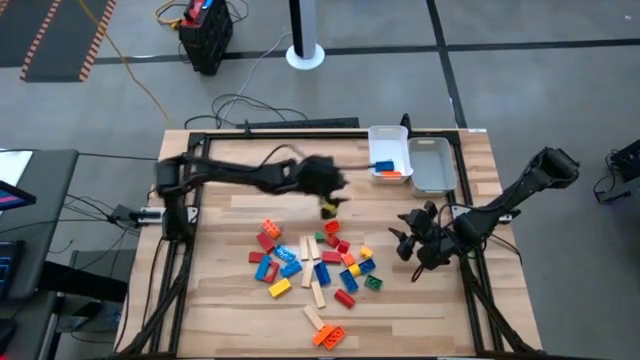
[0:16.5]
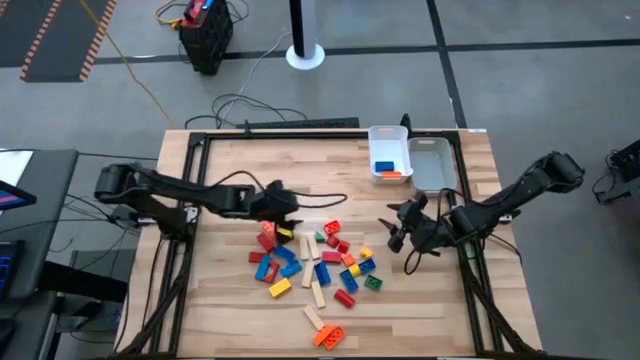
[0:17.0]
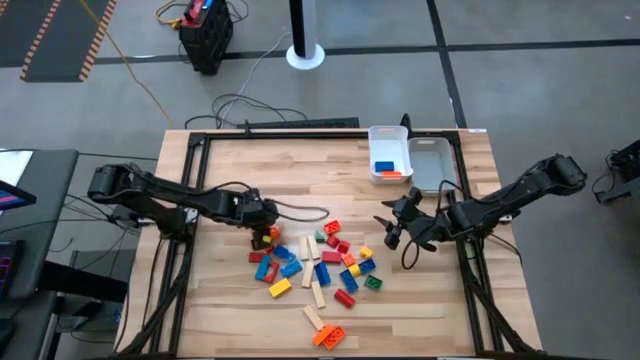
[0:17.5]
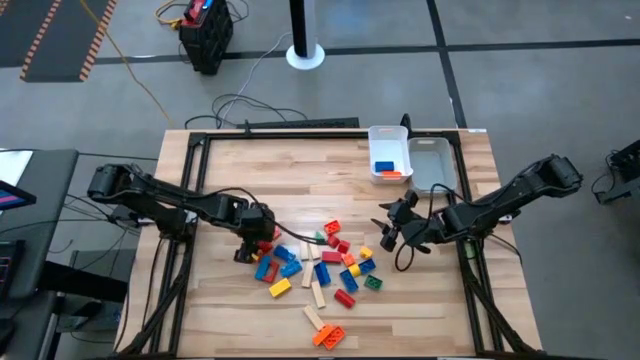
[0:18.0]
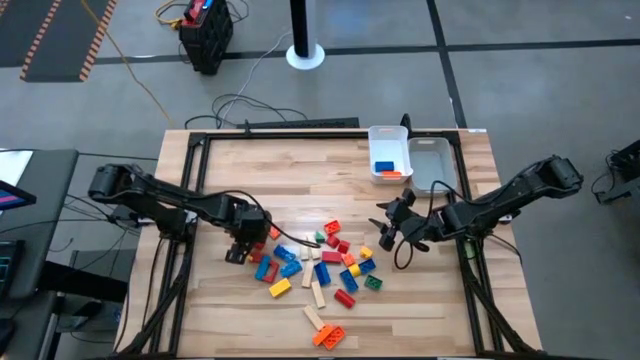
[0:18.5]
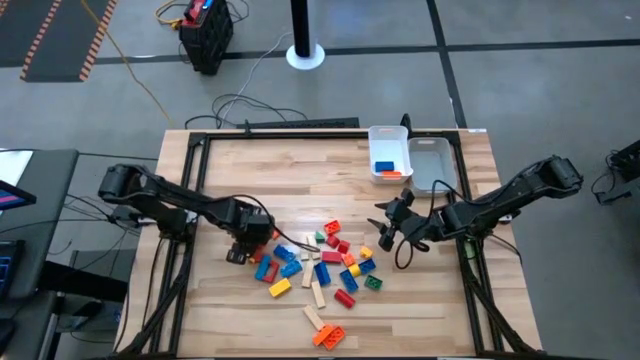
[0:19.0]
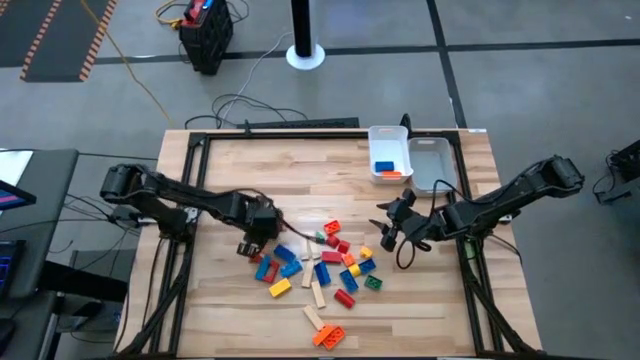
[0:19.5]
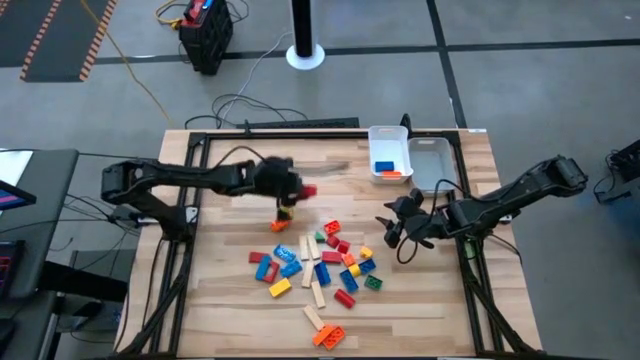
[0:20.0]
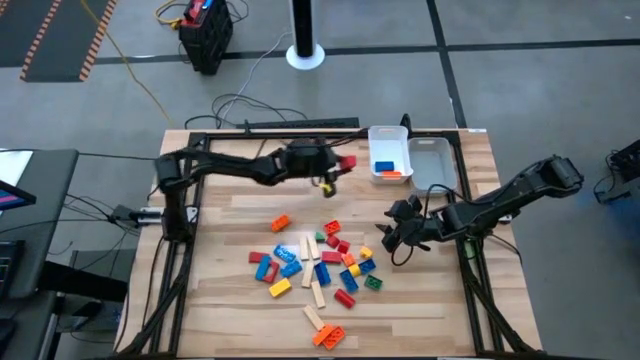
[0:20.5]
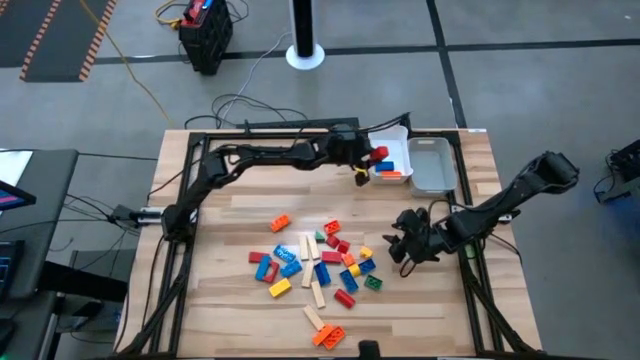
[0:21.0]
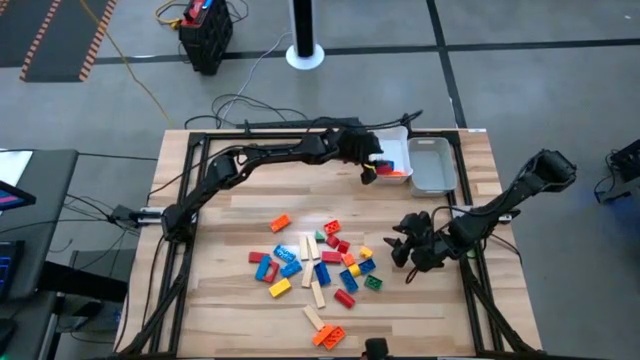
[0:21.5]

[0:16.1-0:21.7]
Task: Sort blocks by size
Put the large red wooden block into the white bin

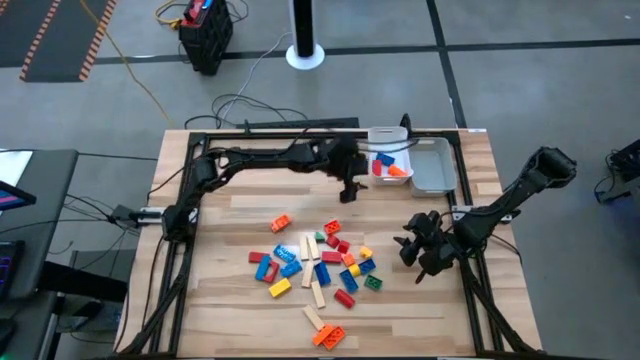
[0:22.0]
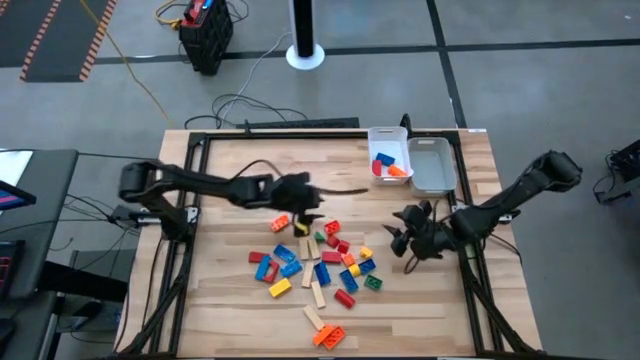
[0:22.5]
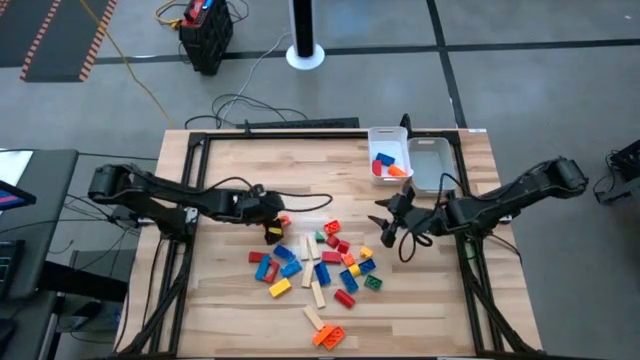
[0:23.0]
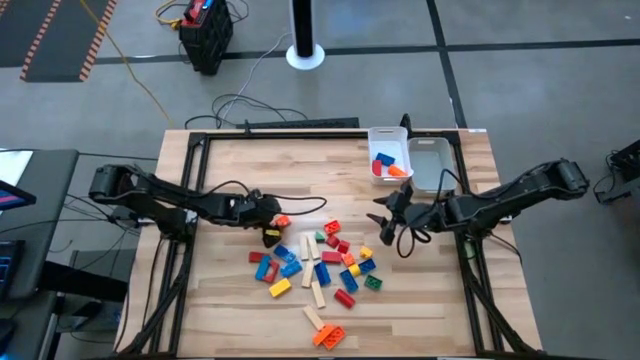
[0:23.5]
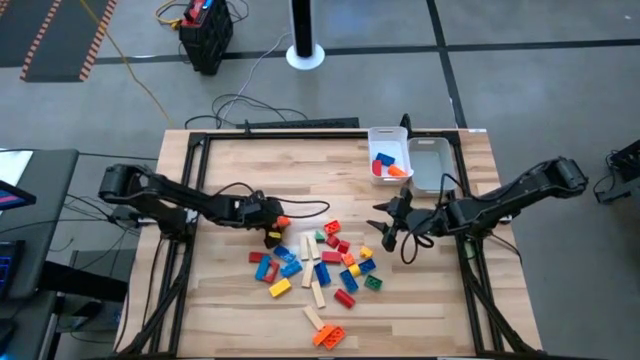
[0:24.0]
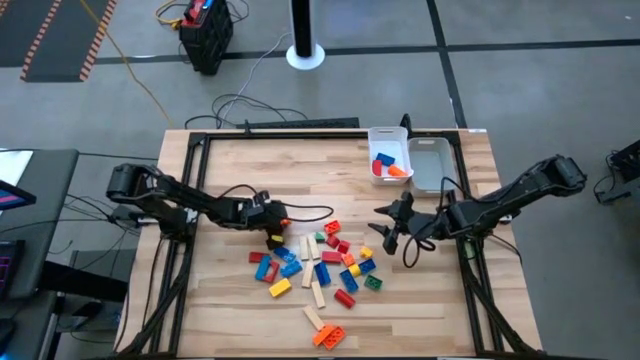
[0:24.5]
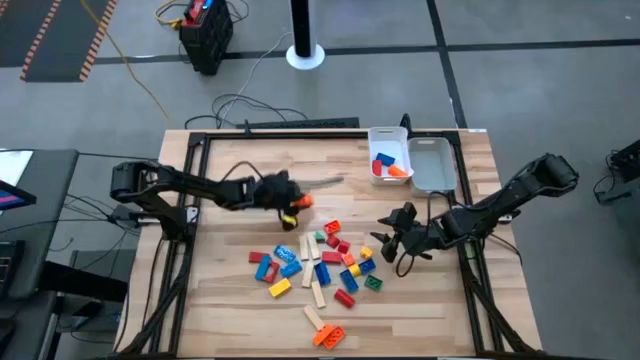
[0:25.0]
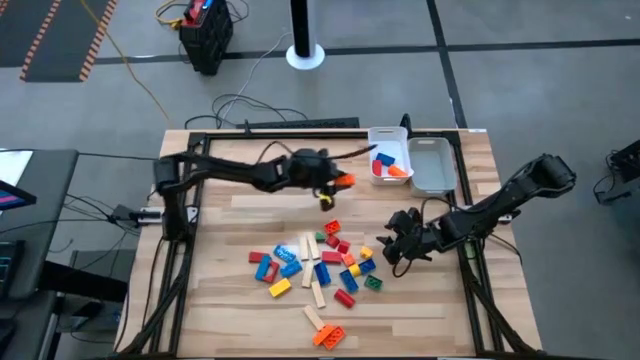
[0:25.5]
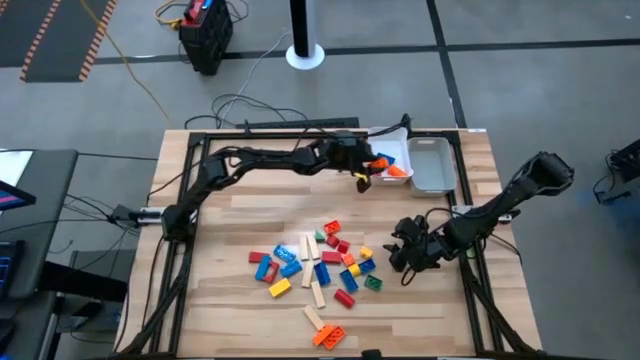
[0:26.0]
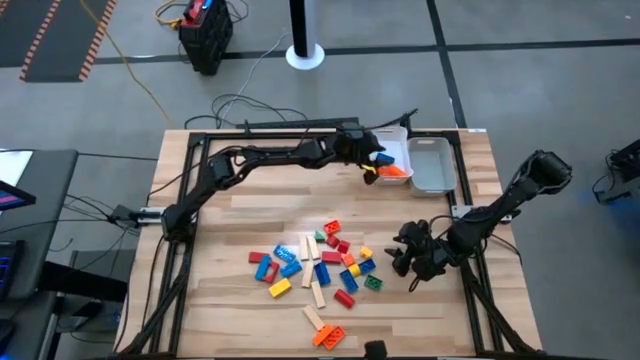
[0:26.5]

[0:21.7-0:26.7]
Put the large orange game piece into the white bin

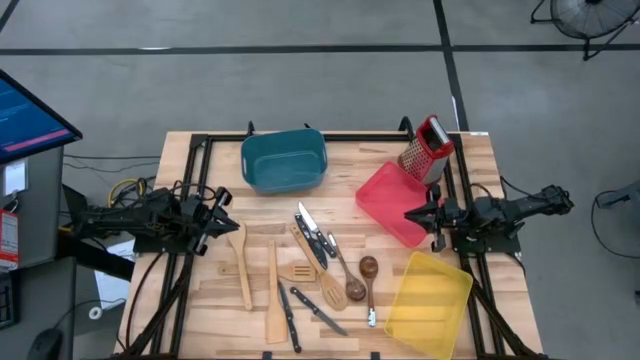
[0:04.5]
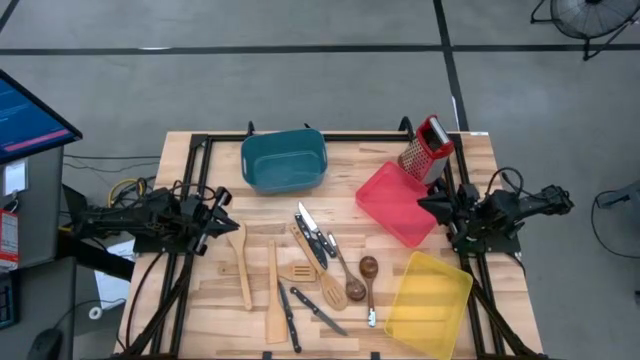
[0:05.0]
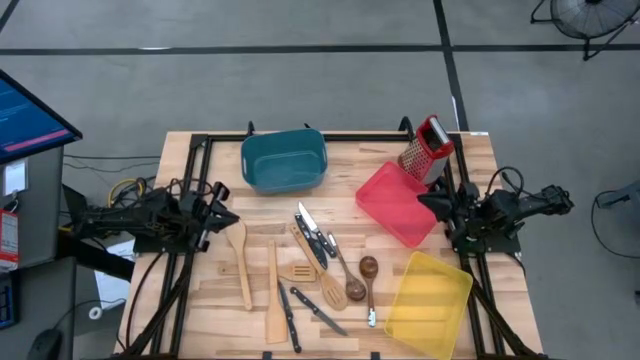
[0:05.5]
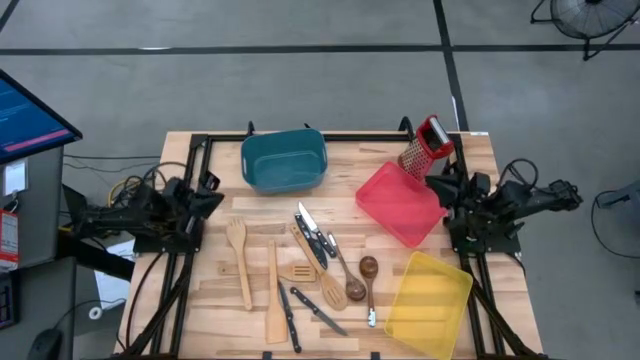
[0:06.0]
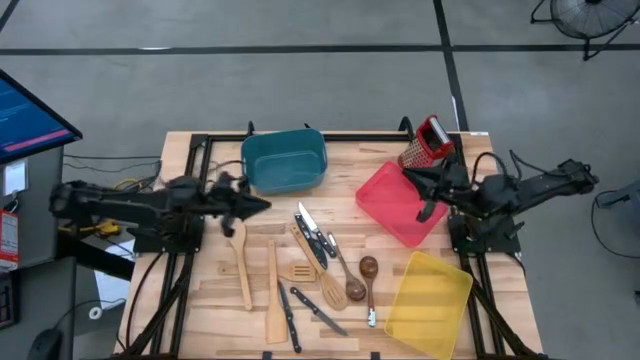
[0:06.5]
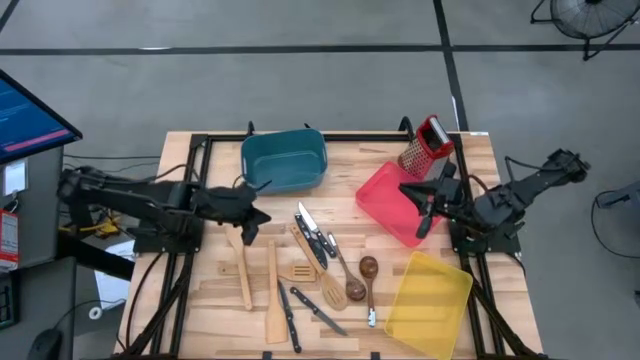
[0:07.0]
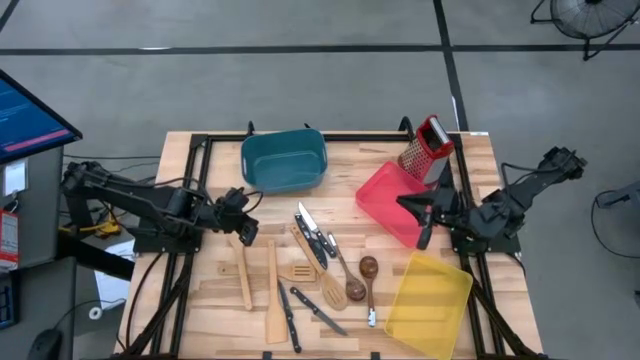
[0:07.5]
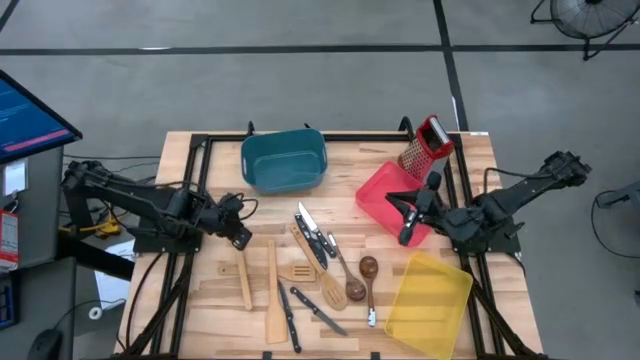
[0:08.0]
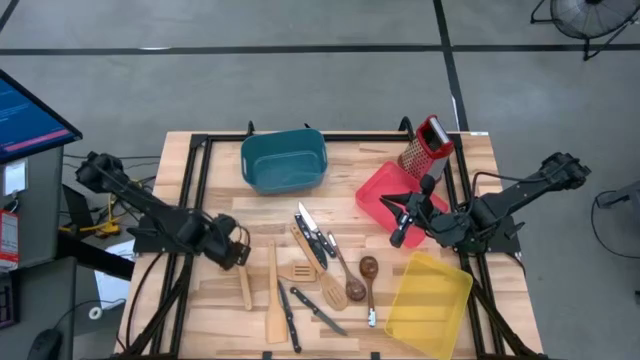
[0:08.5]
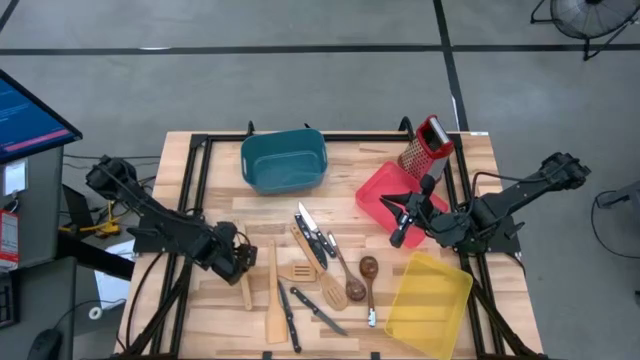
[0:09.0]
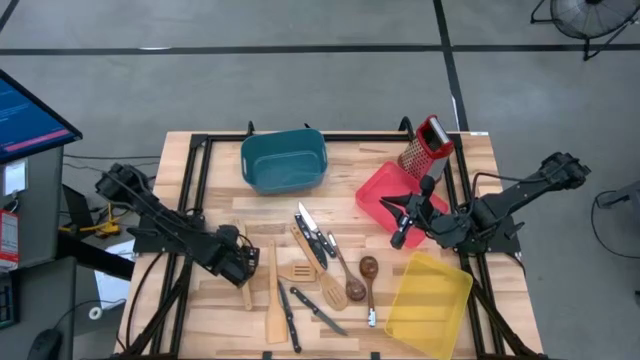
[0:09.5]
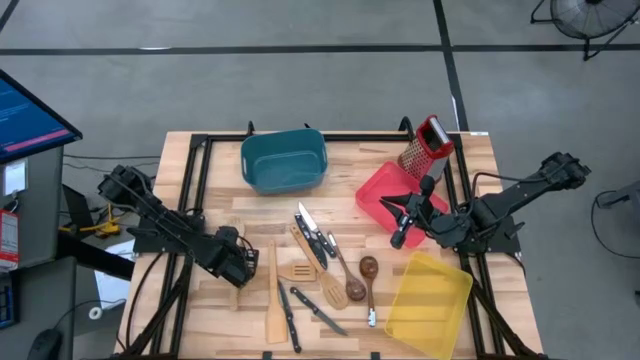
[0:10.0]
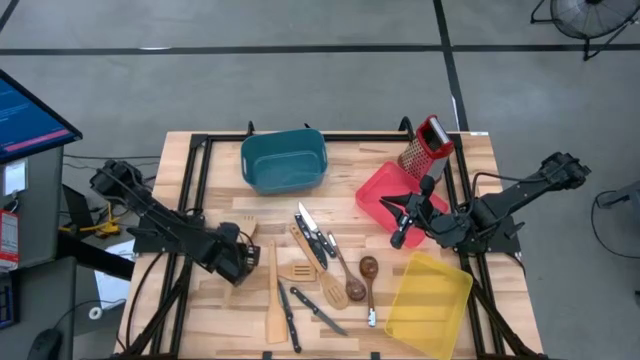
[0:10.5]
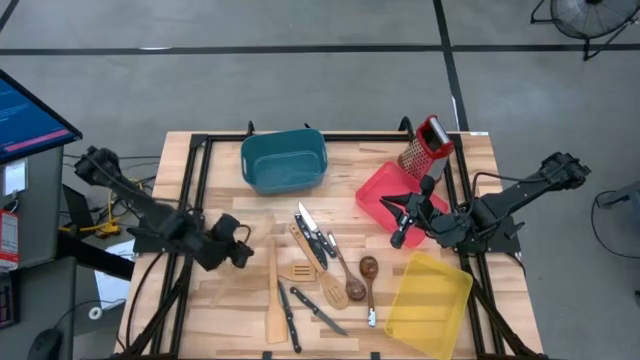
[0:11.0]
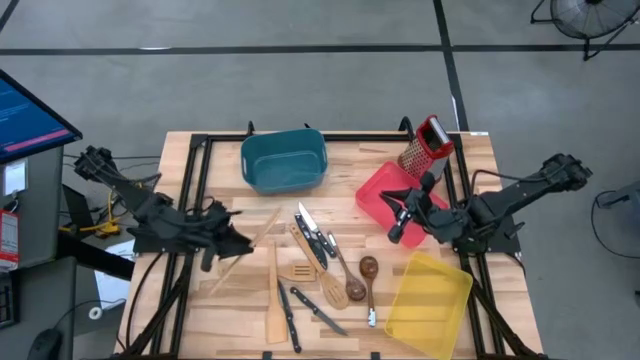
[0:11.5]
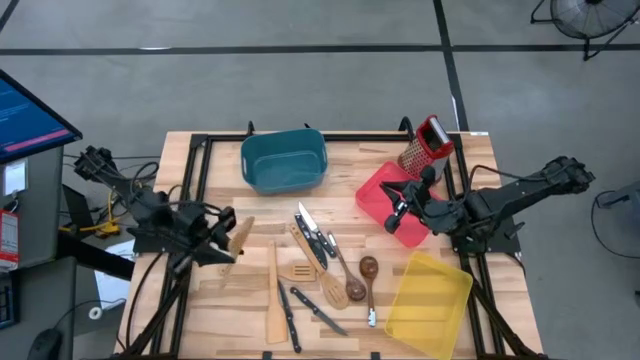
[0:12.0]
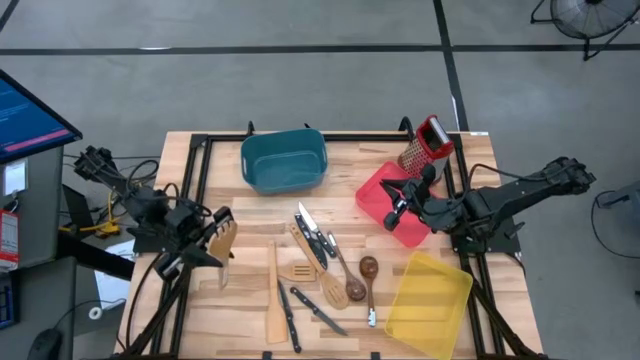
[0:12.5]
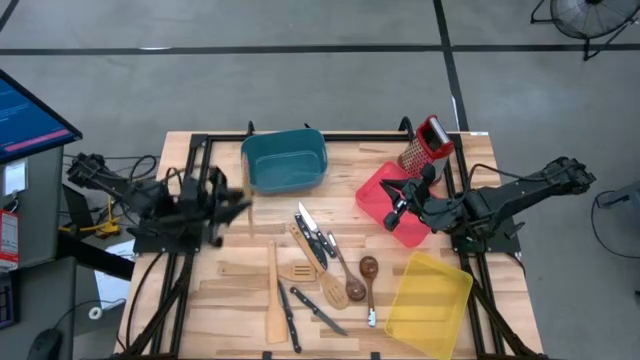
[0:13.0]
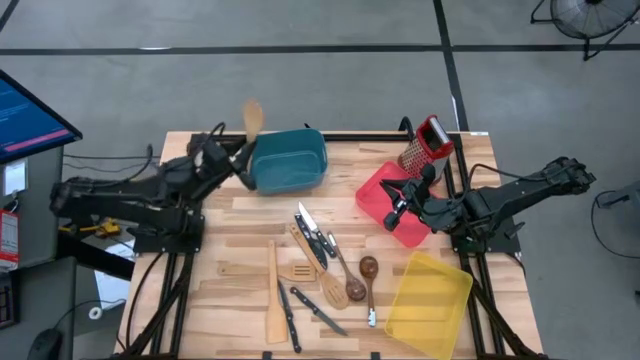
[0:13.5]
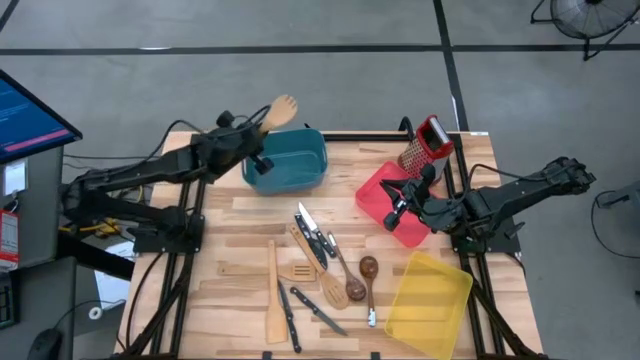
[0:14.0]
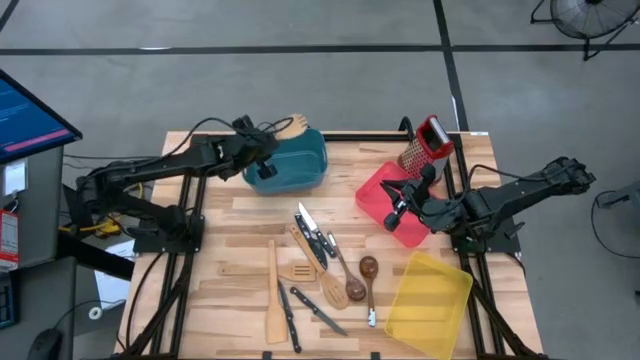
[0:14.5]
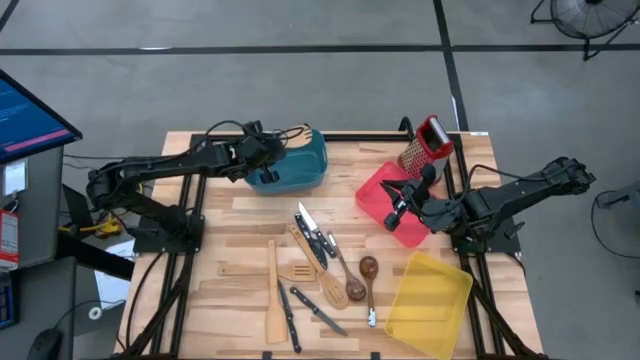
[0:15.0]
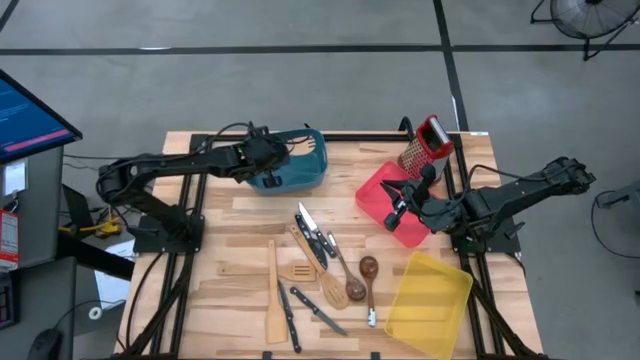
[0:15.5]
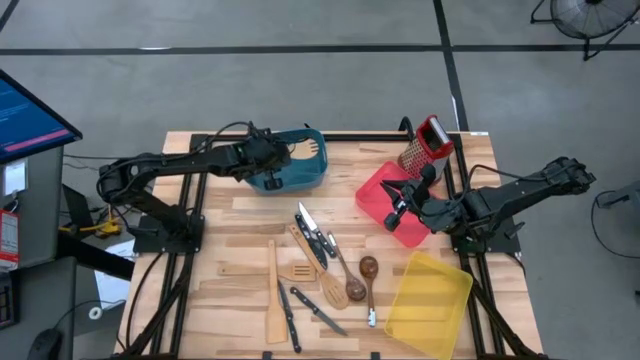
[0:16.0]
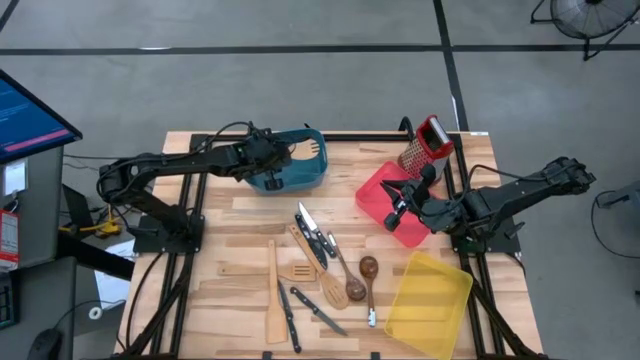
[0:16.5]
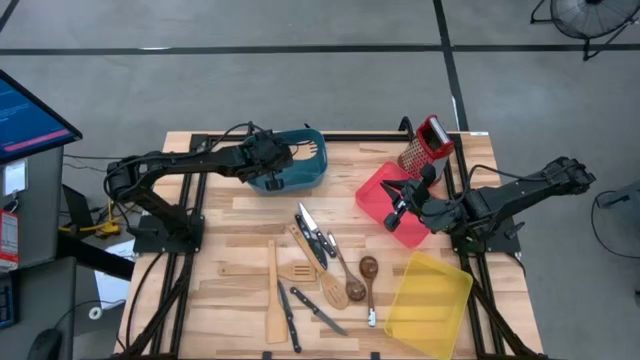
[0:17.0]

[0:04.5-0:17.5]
Task: Pick & Place Kitchen Items
Put the wooden serving spork into the blue bin
